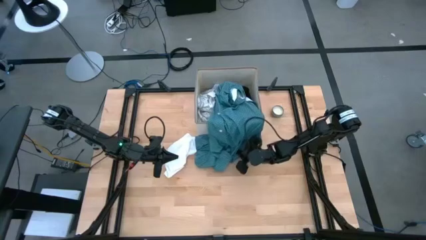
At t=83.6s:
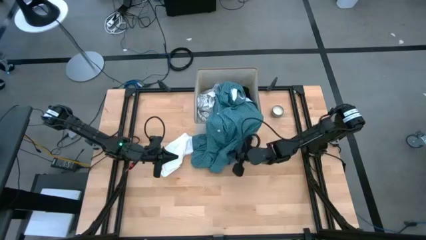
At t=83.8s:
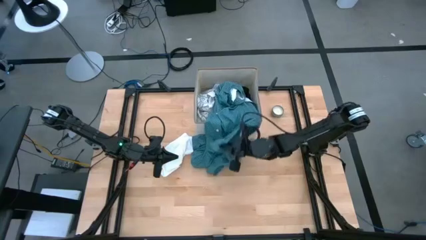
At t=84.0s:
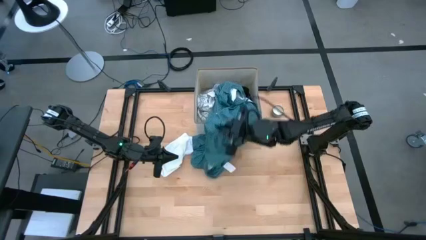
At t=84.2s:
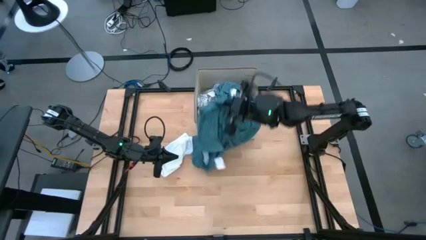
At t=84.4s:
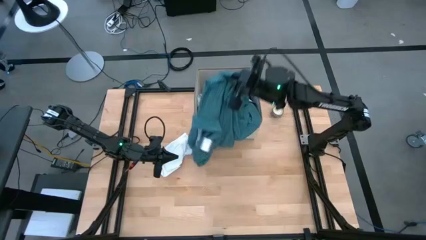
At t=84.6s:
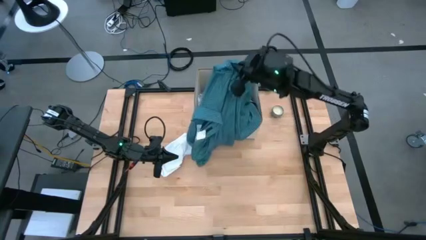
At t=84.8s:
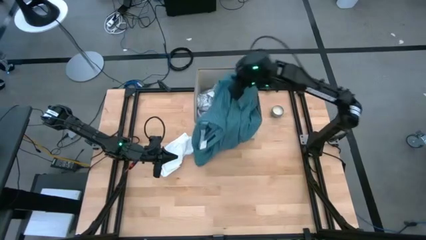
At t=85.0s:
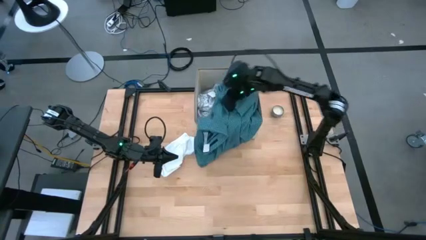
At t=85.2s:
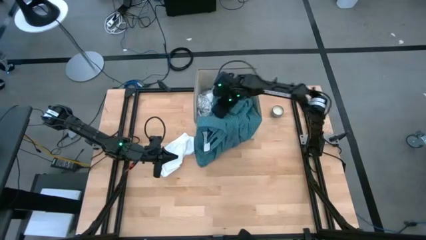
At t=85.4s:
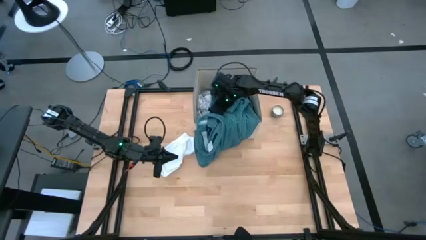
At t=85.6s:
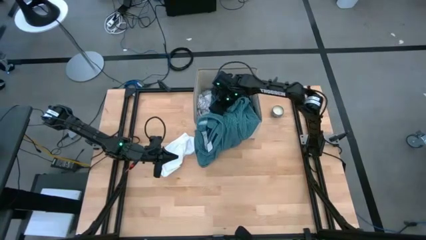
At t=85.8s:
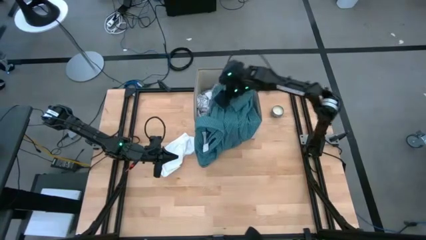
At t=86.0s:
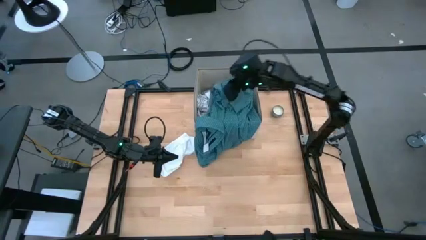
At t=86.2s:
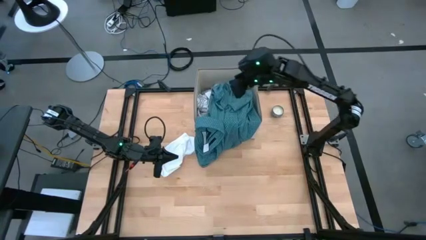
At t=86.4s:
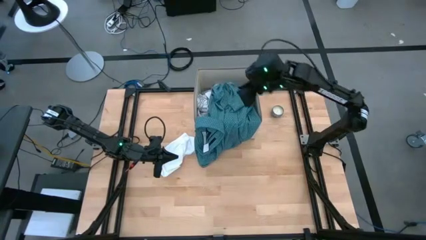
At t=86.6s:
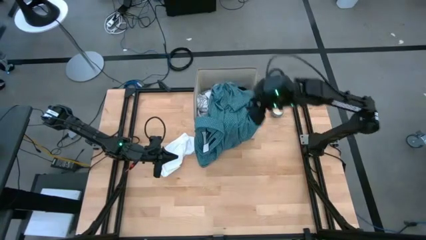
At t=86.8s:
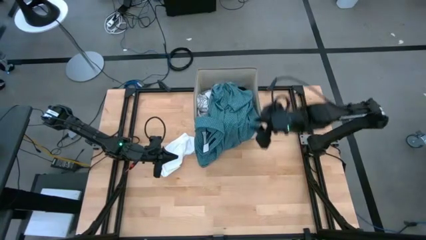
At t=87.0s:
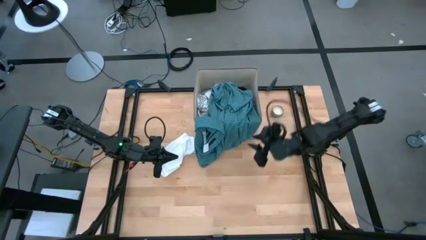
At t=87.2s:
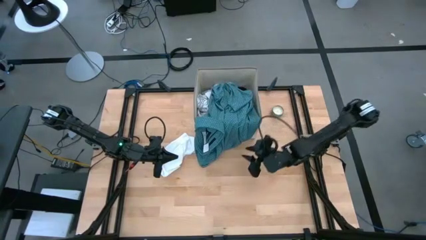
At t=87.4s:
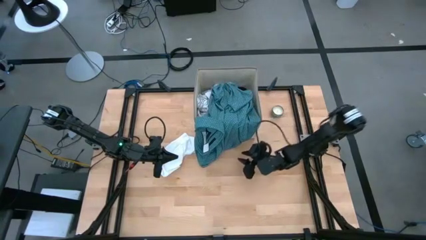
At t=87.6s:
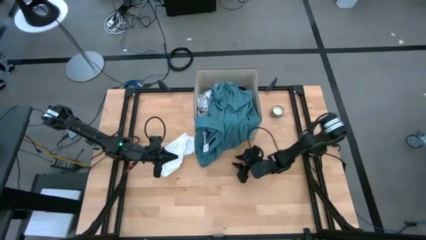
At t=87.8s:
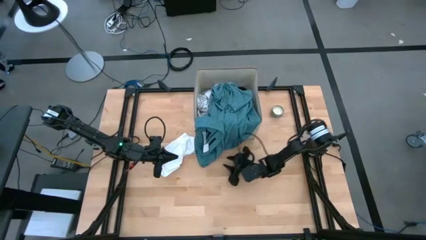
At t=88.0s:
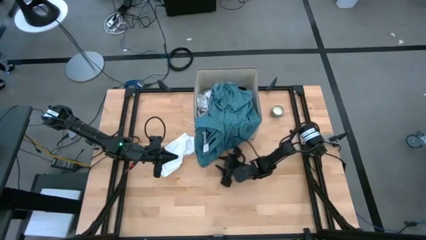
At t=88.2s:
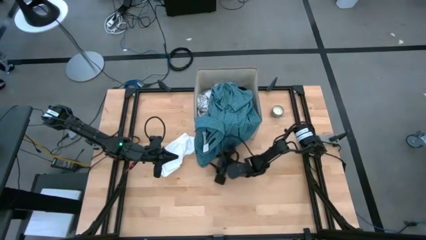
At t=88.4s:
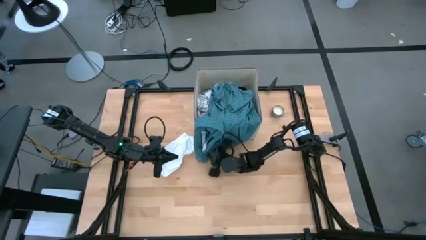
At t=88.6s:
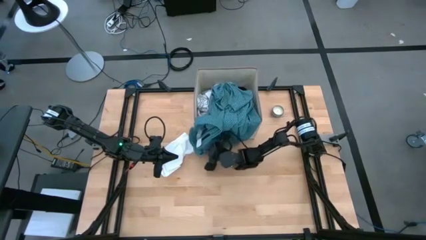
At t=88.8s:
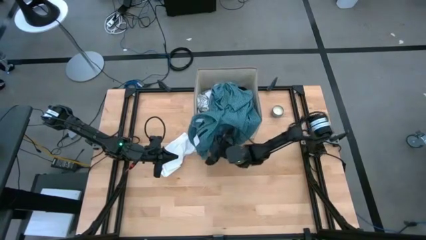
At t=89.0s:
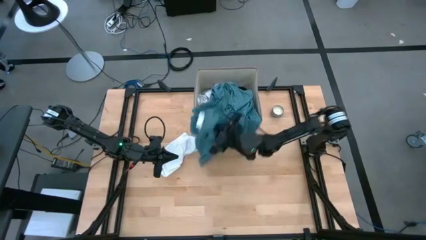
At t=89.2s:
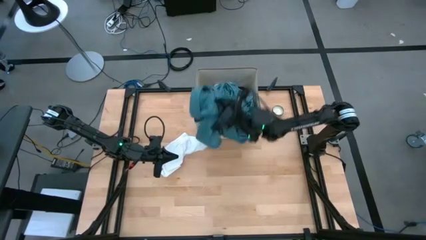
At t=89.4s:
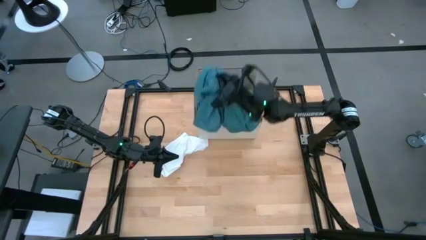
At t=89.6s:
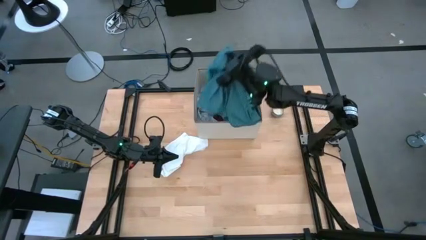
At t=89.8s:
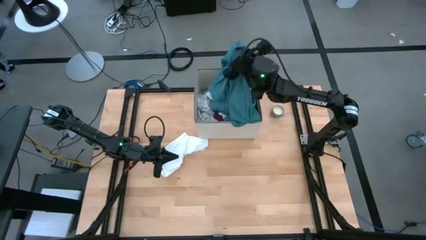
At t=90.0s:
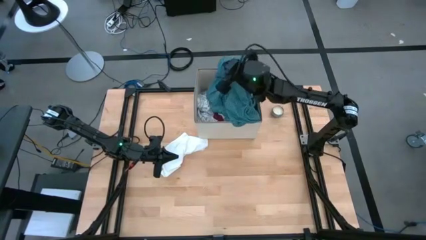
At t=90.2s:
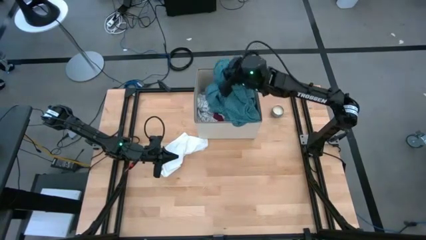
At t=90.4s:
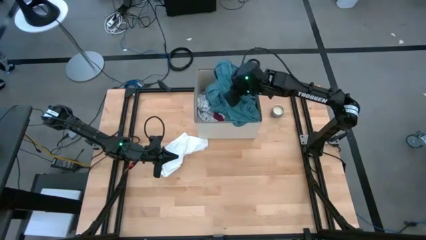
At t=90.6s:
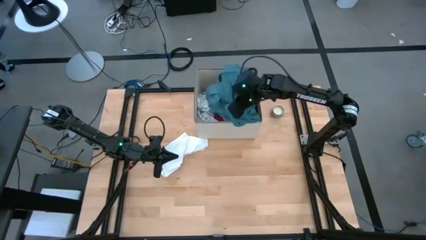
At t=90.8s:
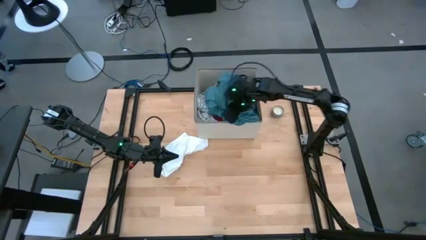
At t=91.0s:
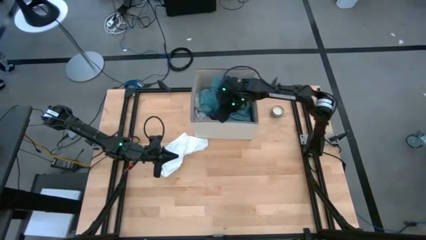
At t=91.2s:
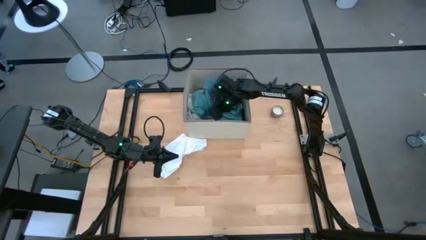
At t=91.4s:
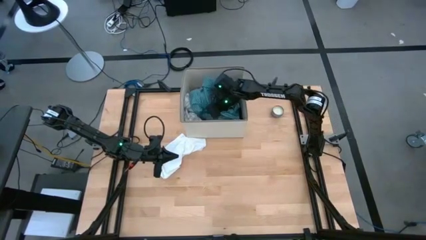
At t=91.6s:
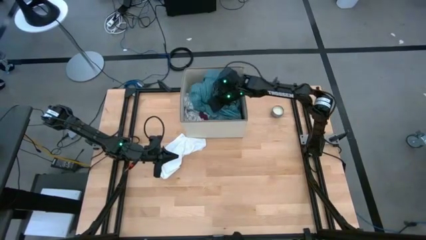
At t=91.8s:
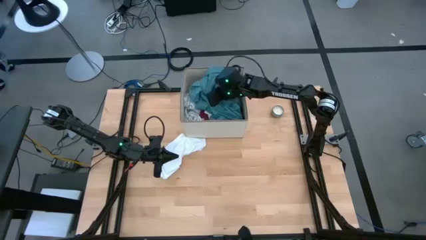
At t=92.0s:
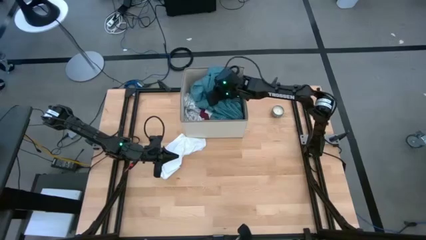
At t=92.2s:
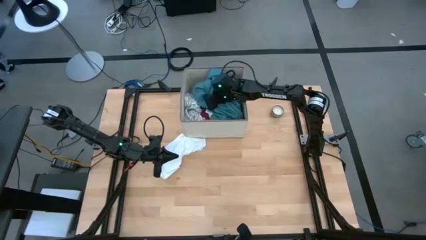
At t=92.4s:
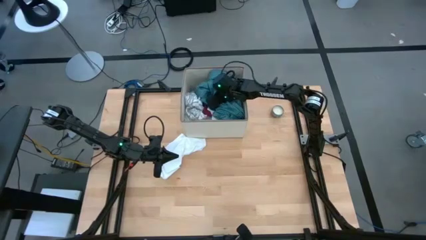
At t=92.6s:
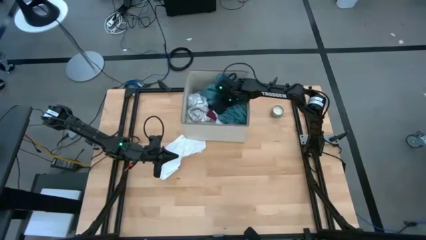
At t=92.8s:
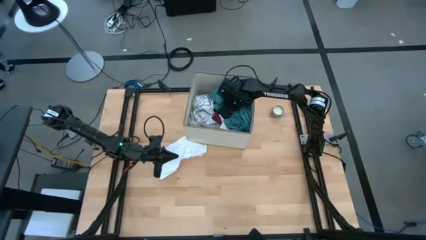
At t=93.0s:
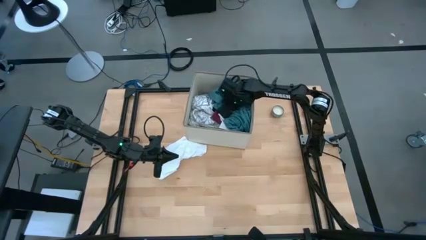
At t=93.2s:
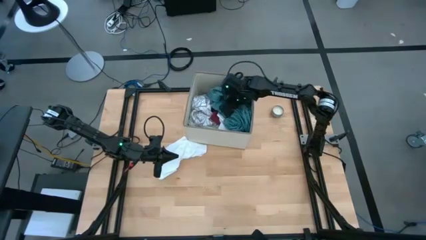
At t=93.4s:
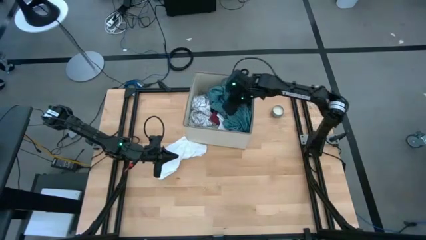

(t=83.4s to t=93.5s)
Task: Sort clothes
Put the green patterned shirt into the bin

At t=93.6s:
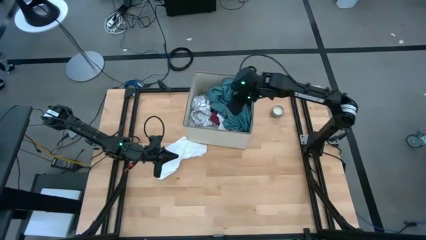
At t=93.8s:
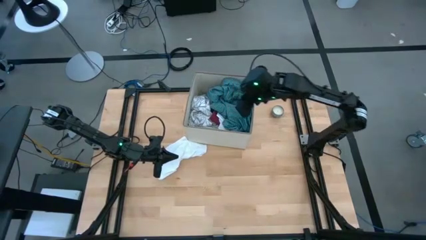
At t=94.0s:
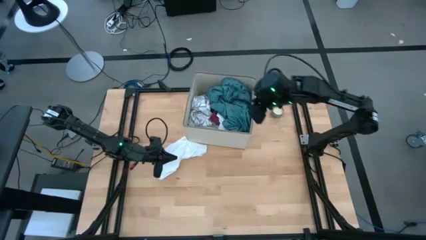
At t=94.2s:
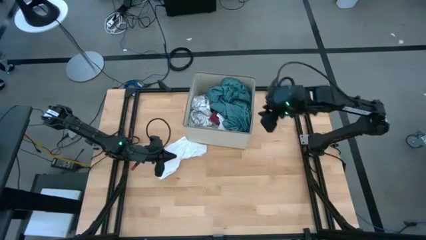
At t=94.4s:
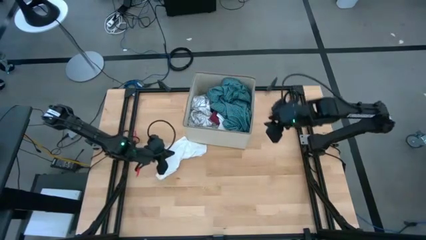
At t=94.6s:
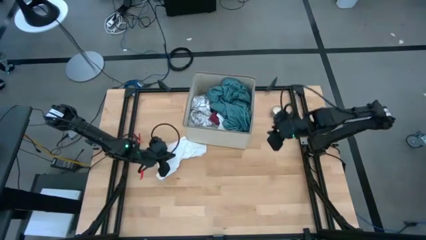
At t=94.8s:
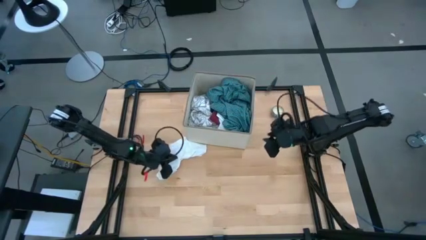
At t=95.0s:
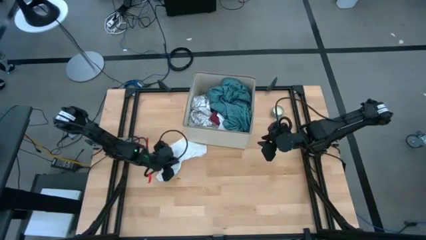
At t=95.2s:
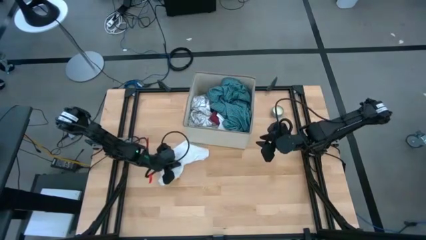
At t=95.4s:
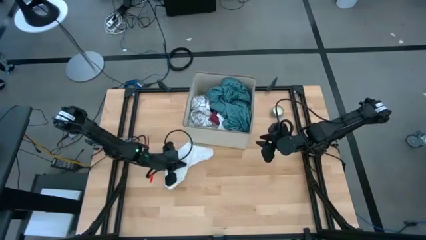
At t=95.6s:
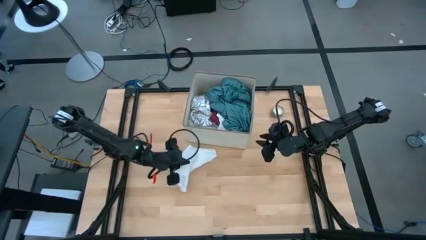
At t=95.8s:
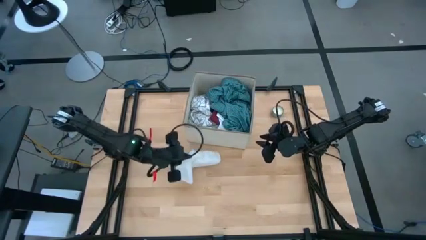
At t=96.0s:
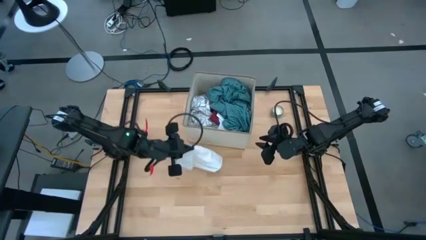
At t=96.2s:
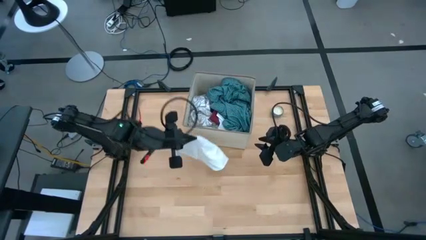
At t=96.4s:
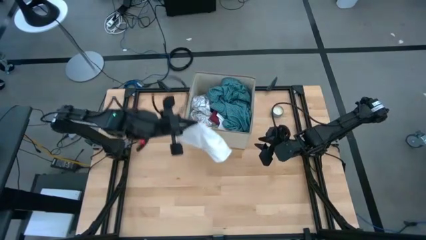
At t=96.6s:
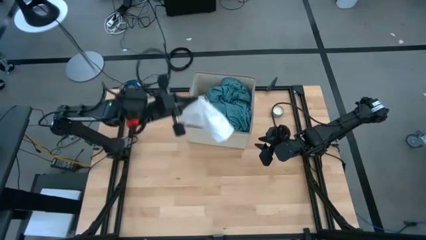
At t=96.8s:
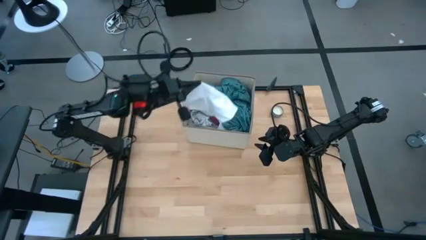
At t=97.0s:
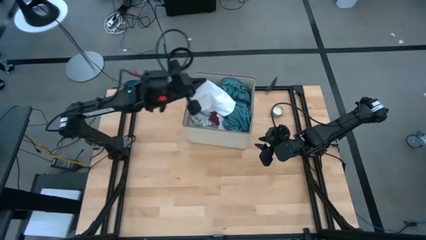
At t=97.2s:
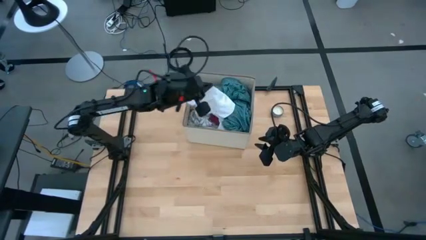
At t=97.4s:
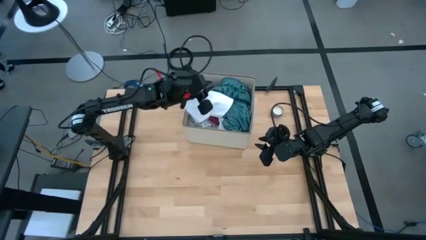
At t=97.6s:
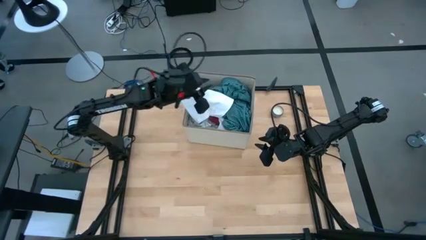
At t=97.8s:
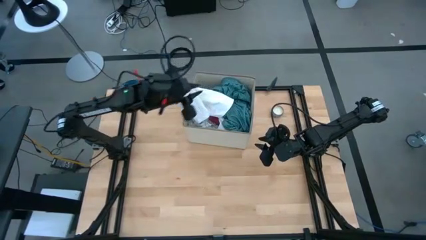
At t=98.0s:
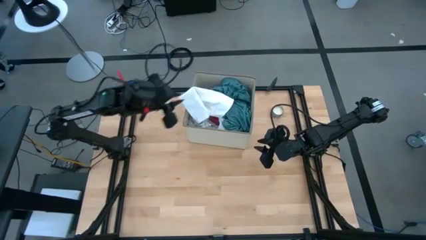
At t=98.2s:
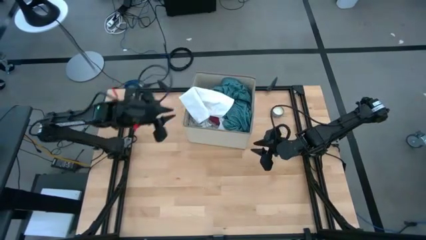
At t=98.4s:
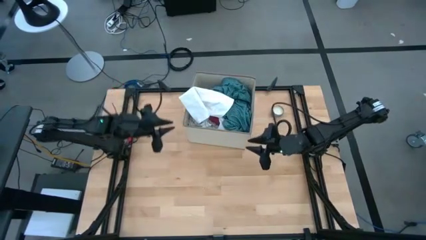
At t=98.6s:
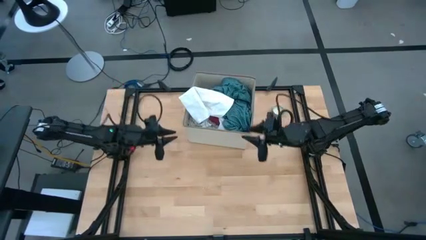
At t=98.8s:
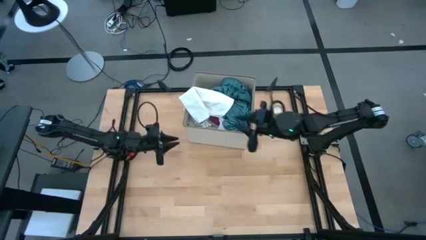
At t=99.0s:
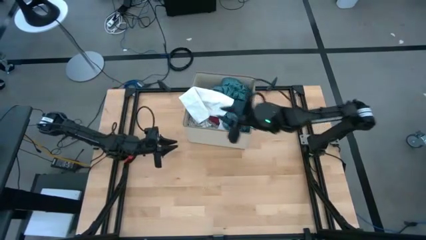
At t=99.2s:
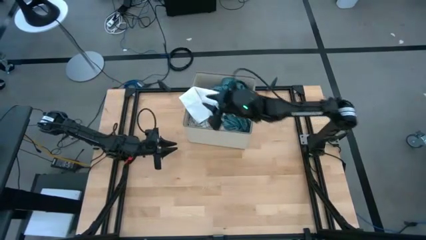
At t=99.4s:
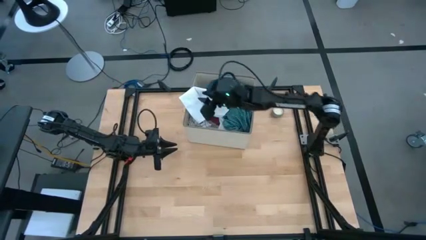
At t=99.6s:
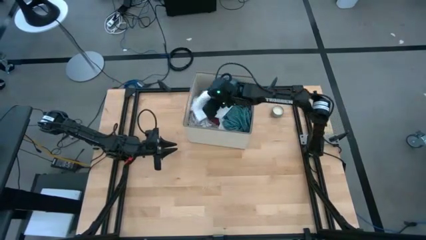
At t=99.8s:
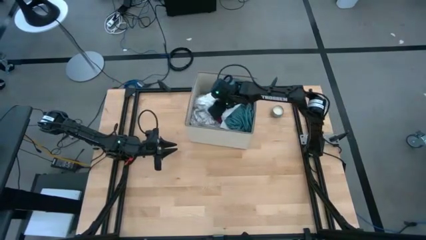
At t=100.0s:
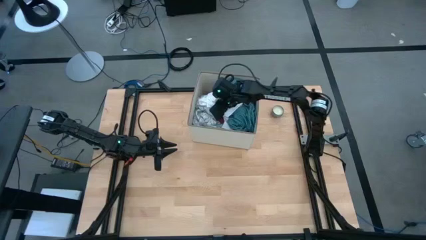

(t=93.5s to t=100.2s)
Put the white shorts into the bin

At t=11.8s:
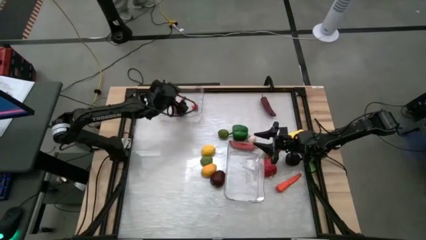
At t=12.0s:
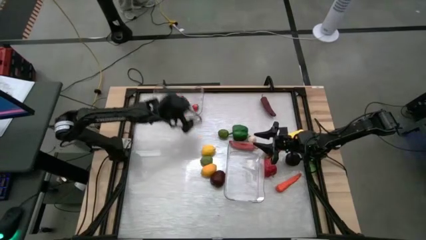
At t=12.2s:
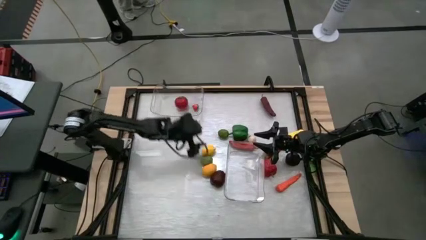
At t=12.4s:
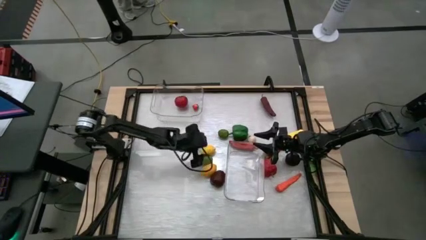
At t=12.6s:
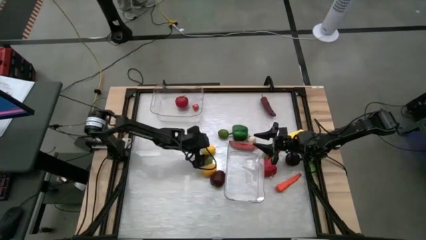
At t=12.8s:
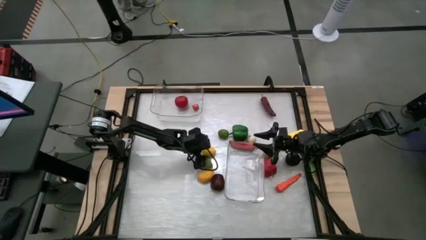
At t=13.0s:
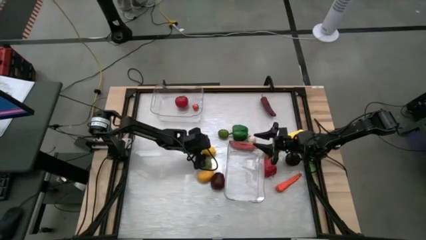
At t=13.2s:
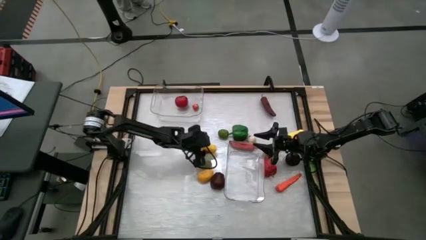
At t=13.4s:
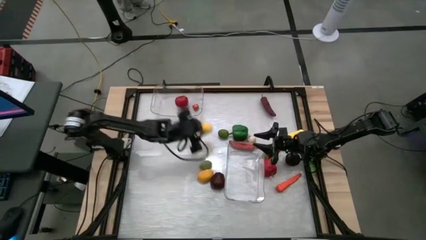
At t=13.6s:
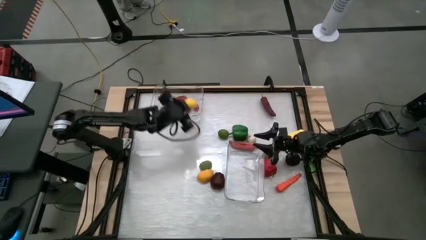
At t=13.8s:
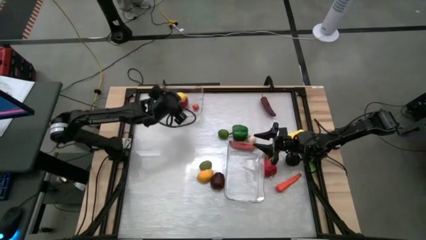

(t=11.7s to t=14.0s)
Task: Sort produce into baskets
Put the top yellow lemon into the top transparent bin
